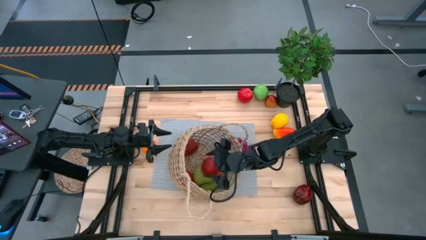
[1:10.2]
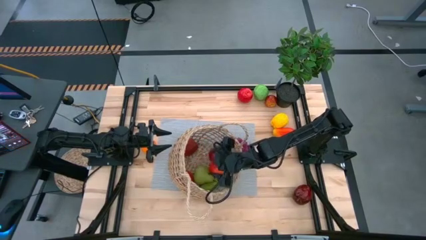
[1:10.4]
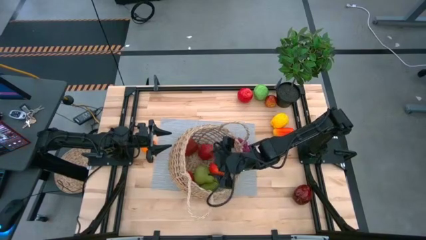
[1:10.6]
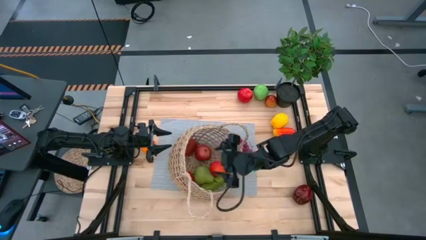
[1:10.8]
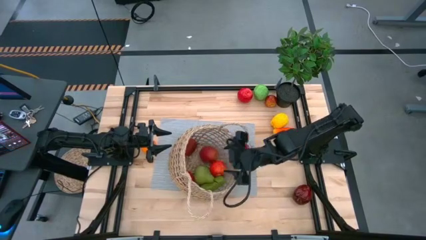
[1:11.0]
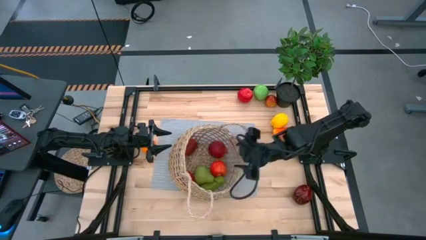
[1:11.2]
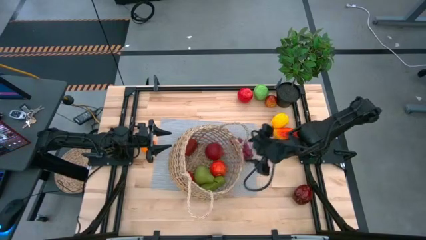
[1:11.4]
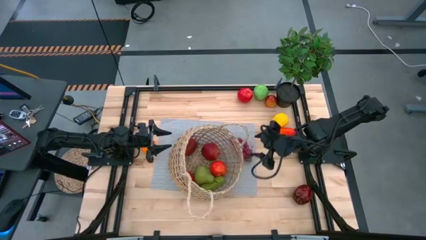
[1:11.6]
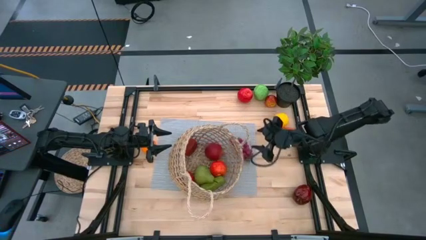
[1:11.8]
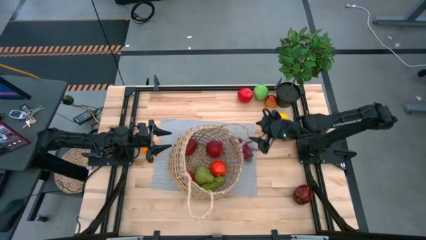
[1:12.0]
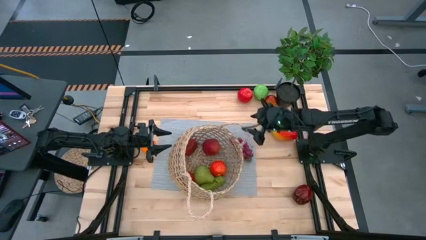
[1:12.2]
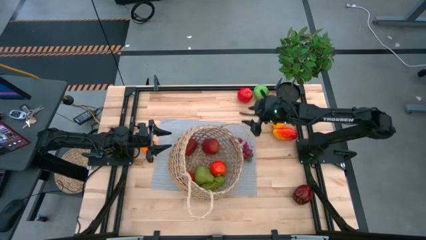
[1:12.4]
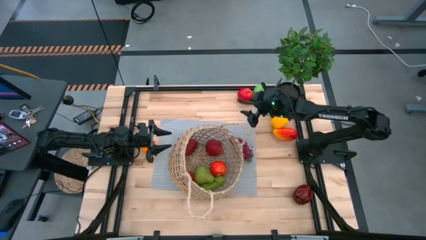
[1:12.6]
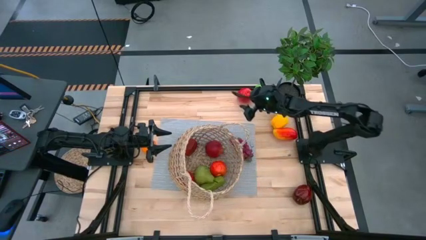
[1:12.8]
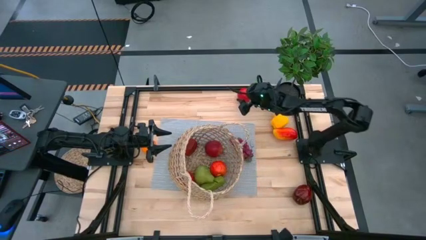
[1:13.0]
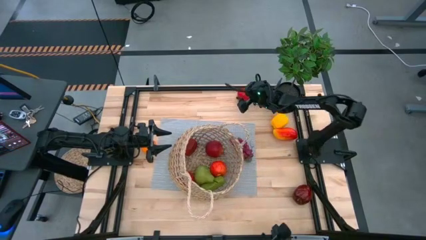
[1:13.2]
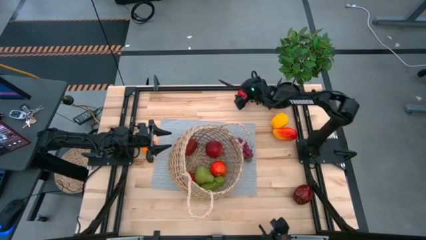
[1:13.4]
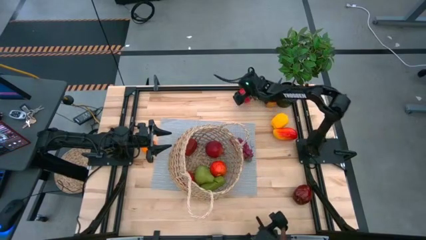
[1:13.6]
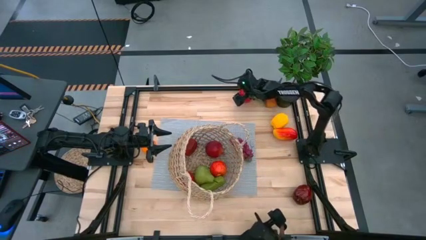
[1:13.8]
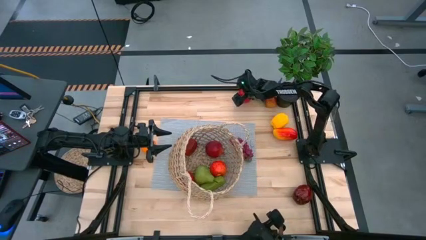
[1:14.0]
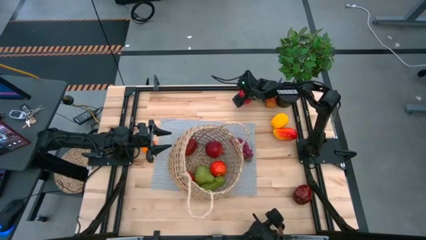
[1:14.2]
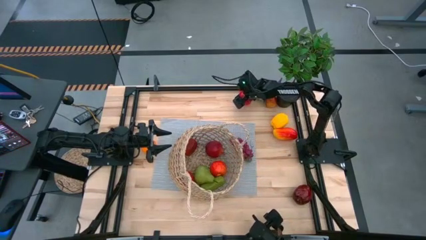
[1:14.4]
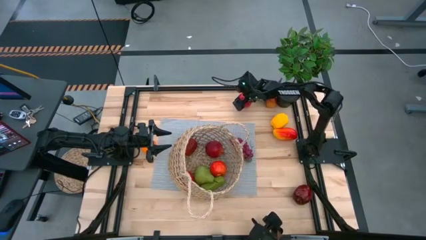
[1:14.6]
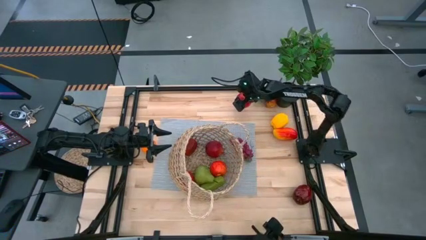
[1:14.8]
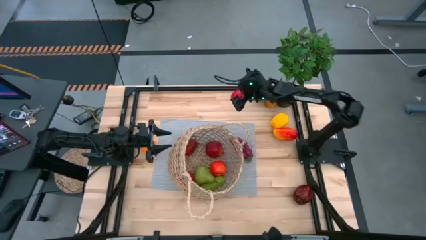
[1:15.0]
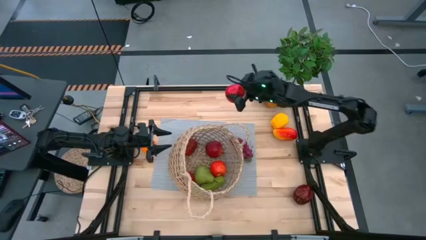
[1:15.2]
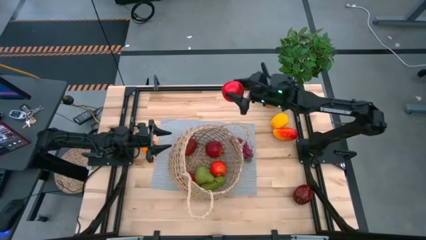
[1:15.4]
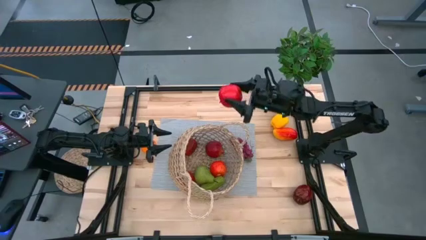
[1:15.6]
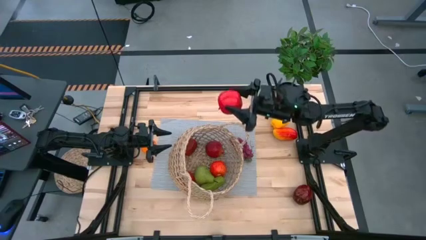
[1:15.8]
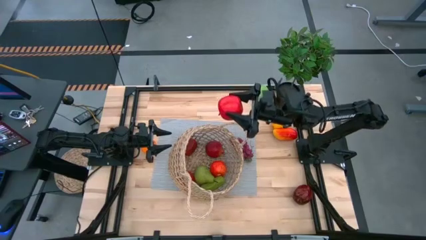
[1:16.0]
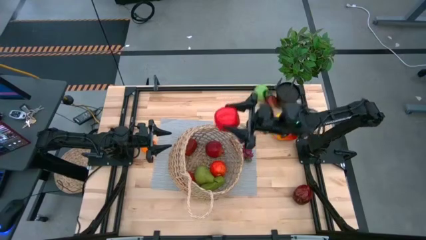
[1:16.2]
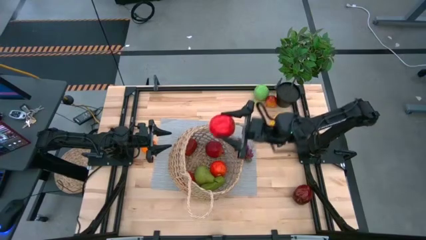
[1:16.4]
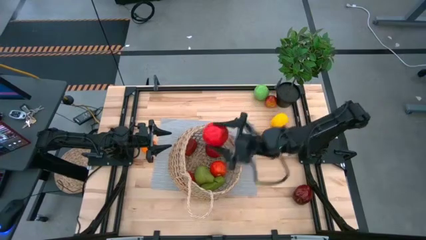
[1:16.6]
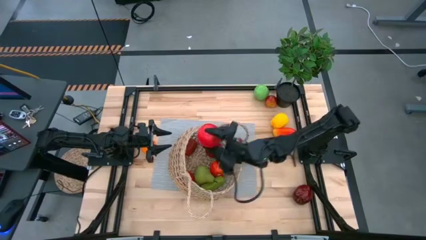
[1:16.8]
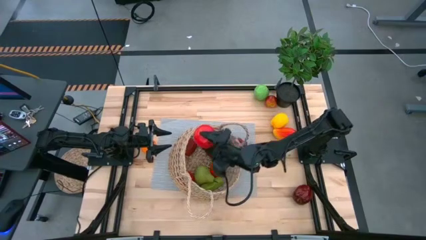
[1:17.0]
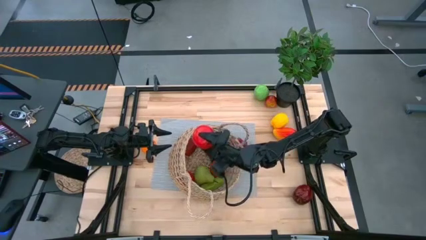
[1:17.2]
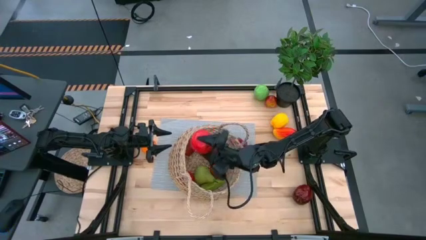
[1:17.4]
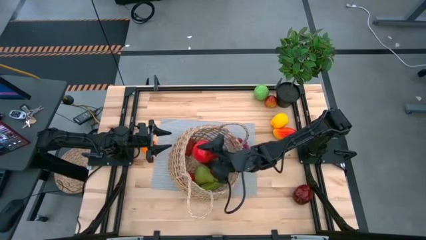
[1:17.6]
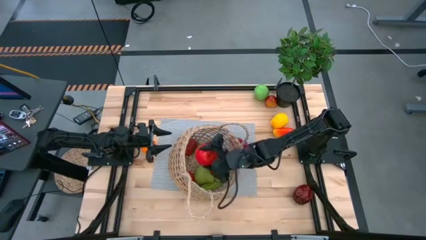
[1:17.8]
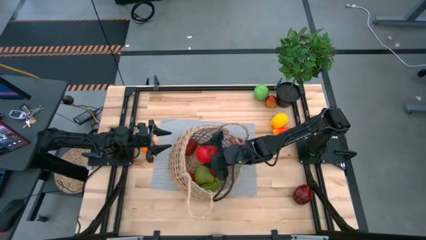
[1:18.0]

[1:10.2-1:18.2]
Task: Build produce basket
Put the apple into the basket

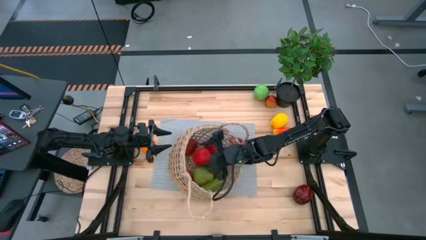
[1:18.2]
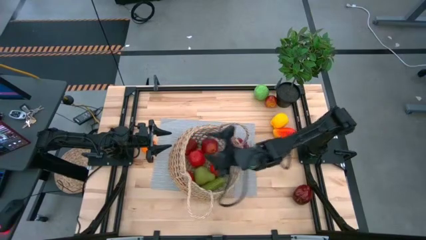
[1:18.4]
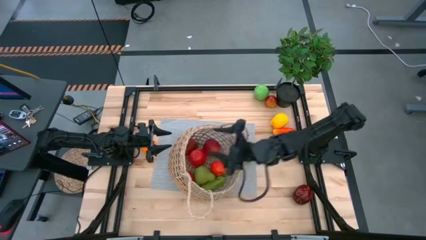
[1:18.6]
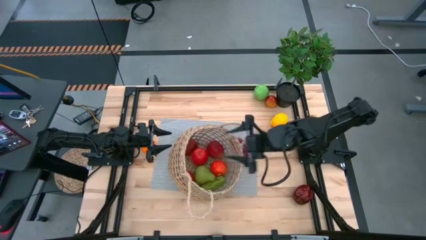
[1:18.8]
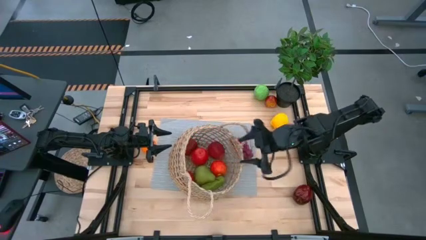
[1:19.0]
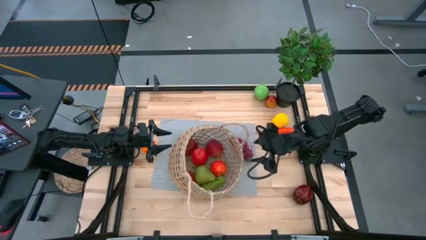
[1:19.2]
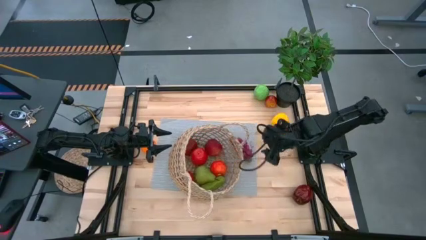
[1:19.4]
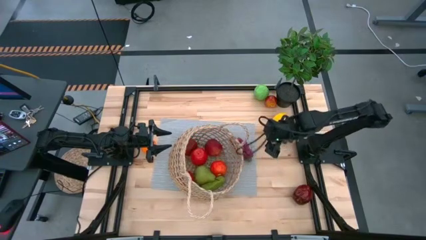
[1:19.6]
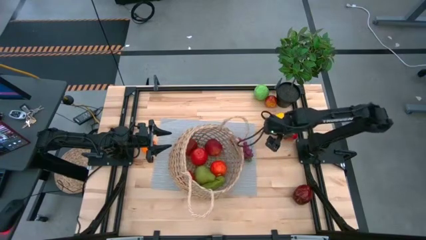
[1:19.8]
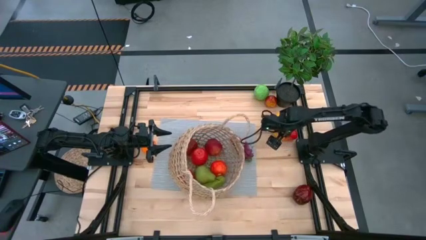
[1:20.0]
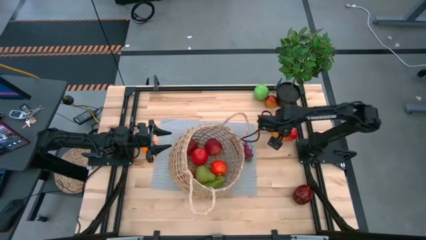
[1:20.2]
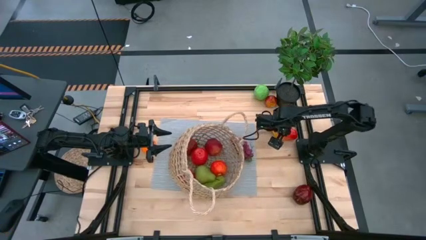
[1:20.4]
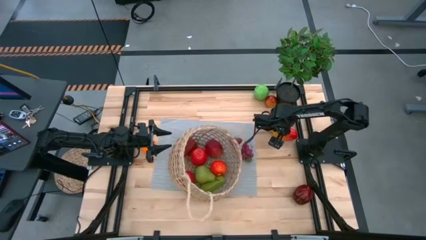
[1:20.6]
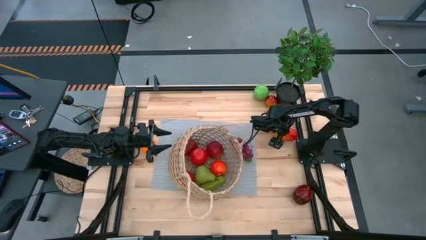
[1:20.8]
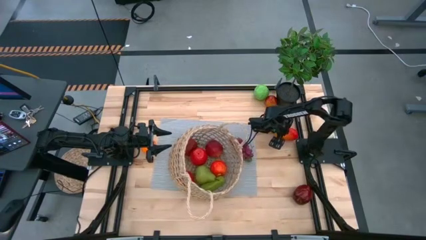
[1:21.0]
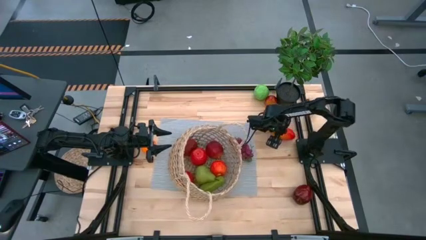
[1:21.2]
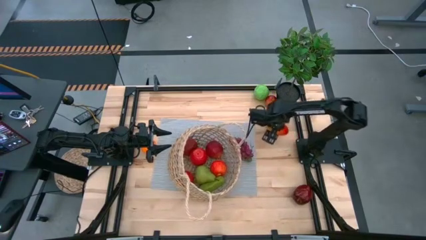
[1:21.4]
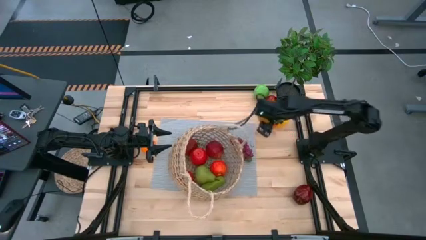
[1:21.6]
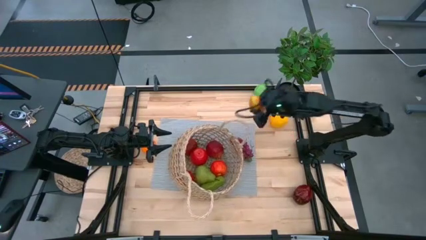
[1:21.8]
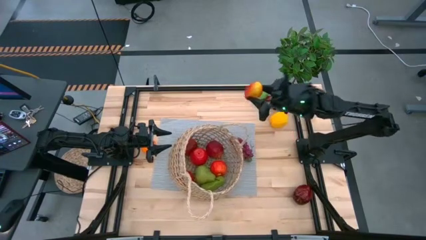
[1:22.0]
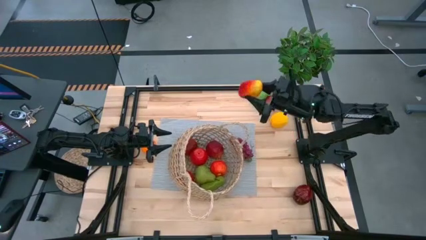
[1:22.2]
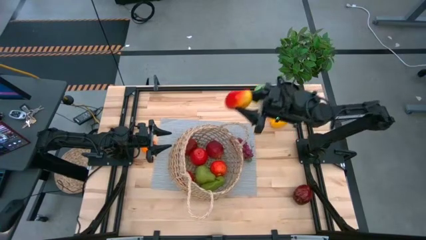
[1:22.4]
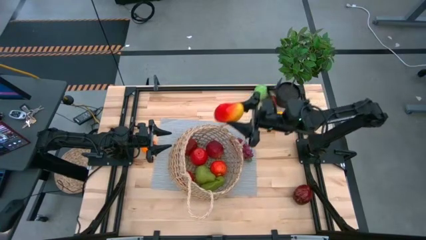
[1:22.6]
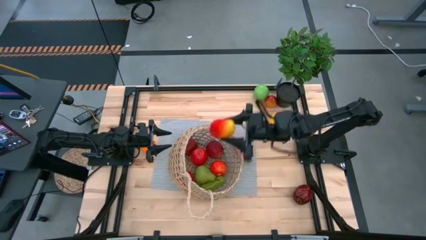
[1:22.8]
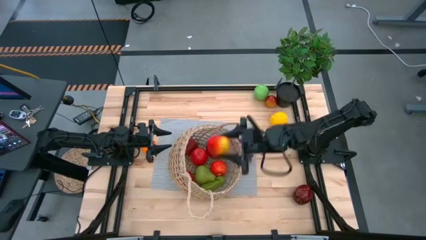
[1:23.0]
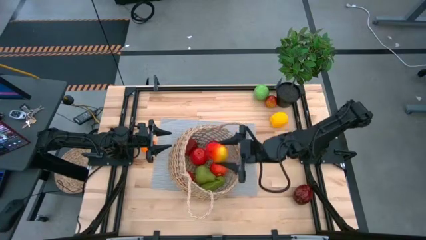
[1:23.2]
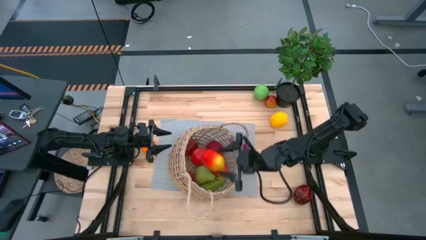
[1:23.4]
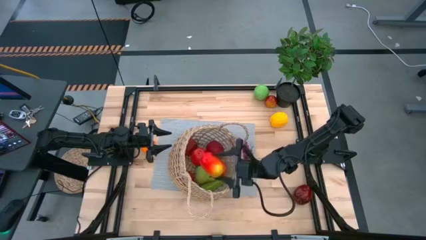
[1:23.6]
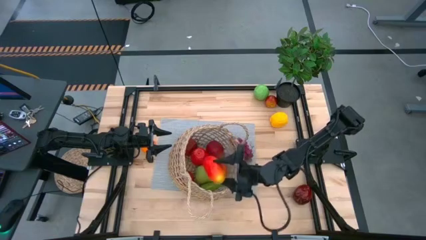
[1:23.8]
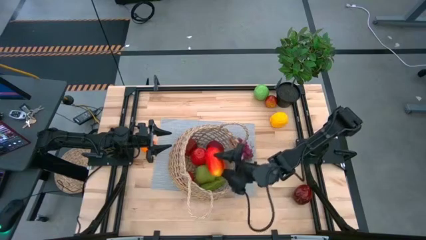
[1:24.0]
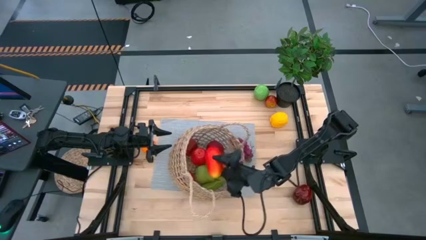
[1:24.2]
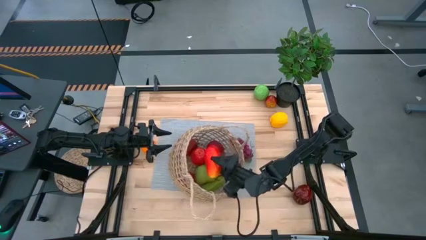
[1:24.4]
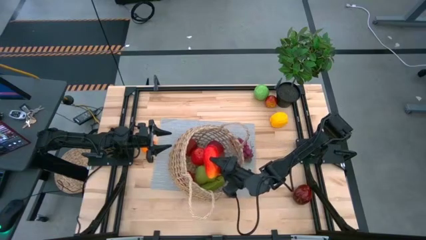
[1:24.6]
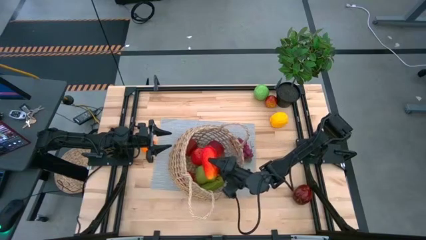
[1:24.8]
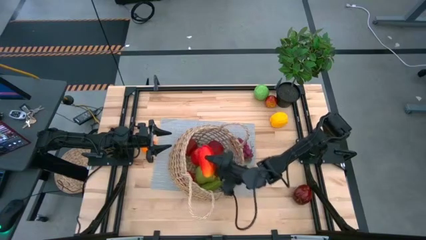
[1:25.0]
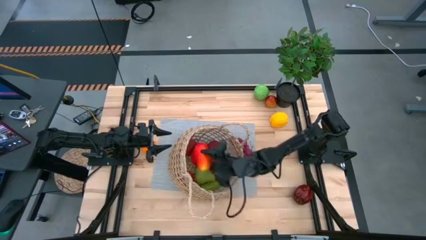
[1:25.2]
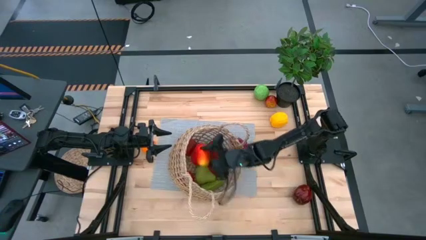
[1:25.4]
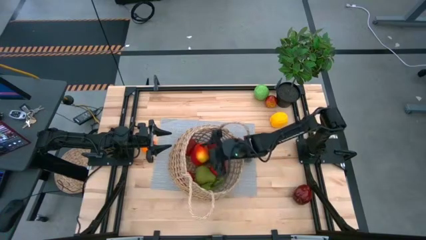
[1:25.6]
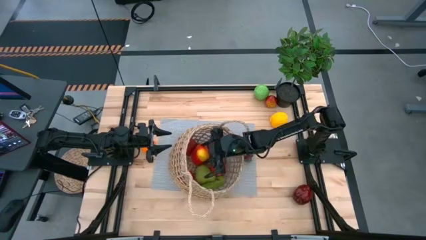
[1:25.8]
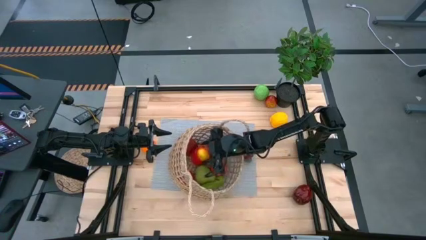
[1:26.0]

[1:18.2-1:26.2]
Put the mango into the basket
